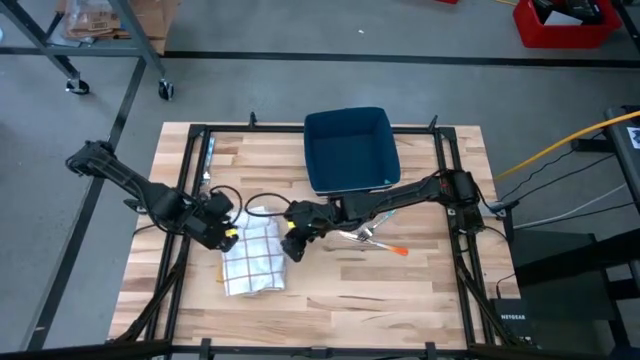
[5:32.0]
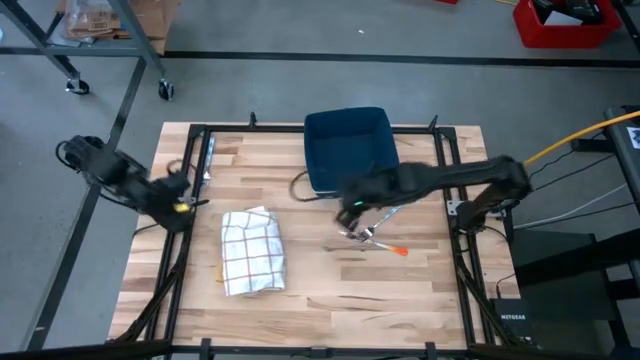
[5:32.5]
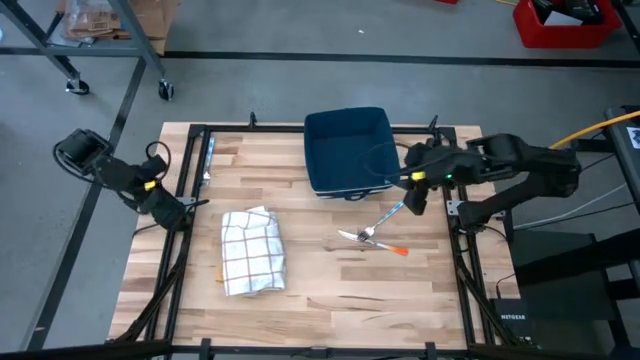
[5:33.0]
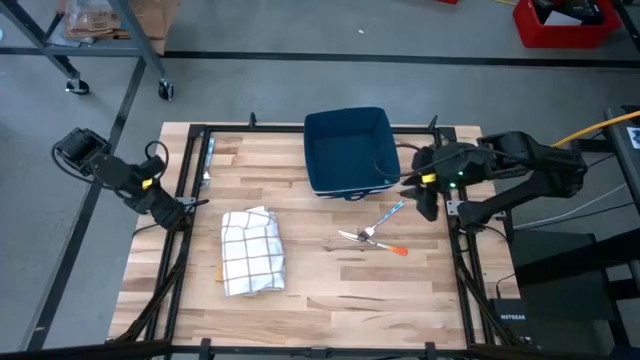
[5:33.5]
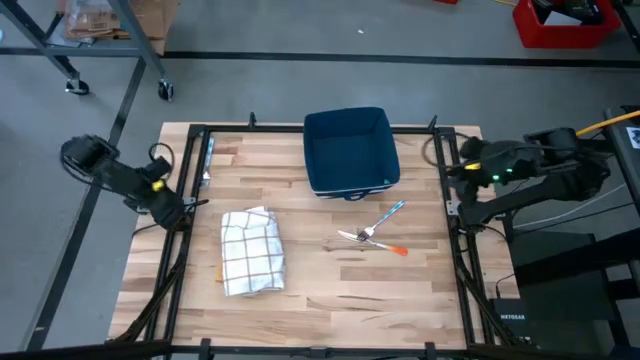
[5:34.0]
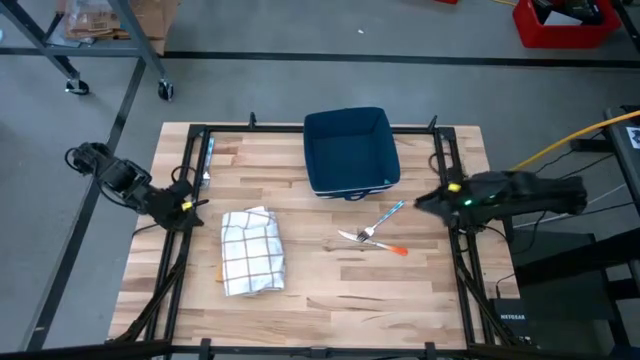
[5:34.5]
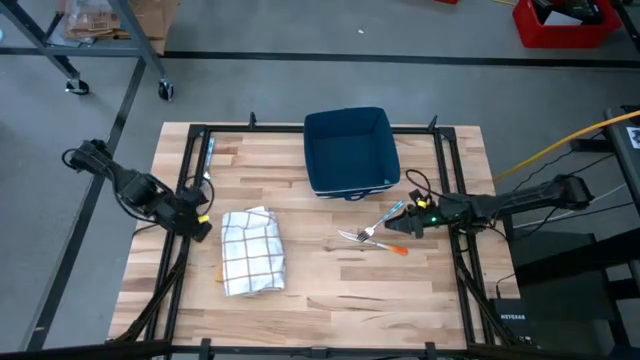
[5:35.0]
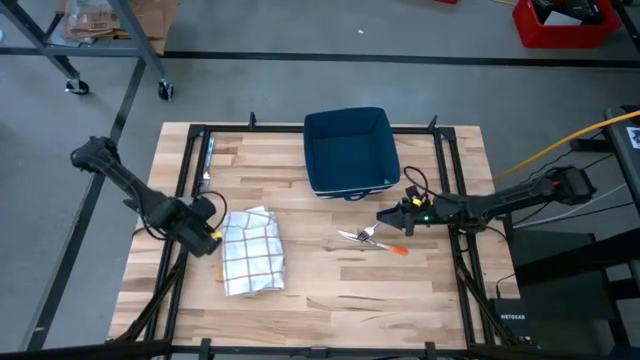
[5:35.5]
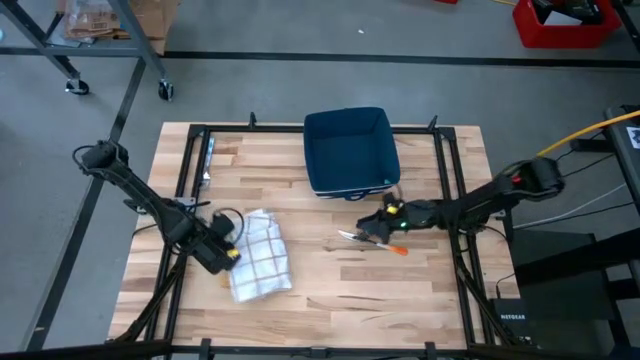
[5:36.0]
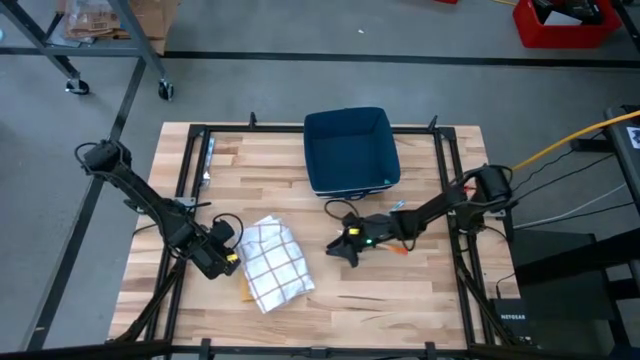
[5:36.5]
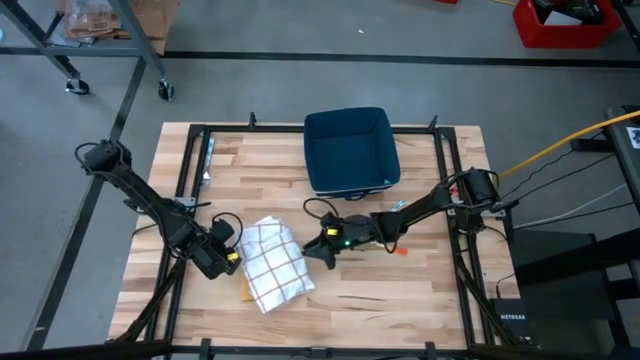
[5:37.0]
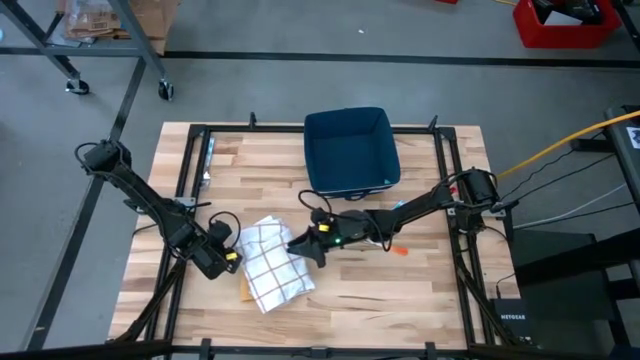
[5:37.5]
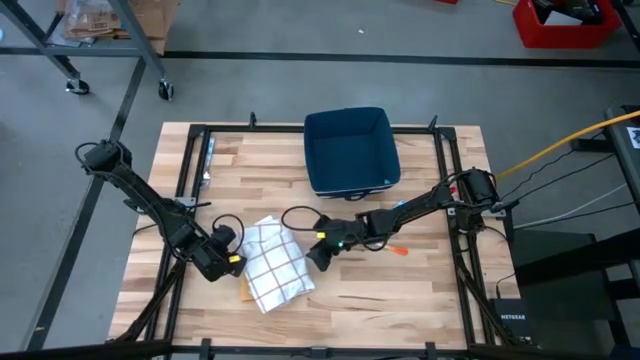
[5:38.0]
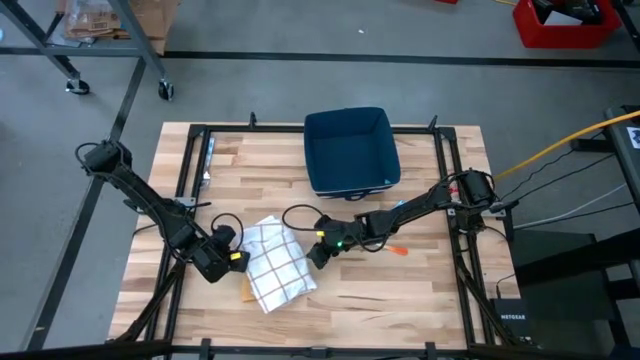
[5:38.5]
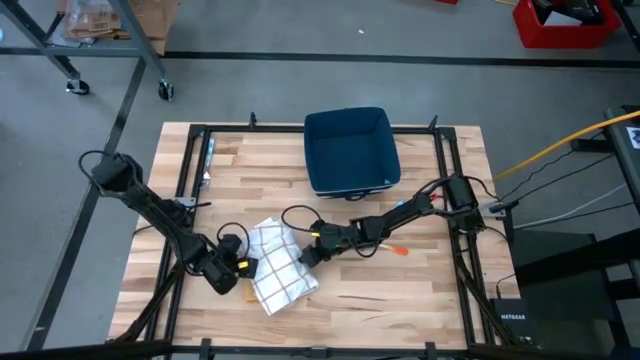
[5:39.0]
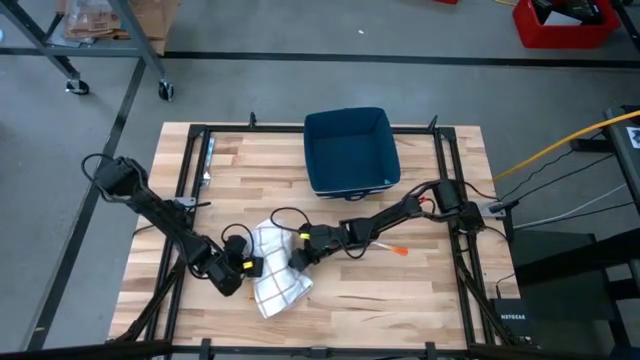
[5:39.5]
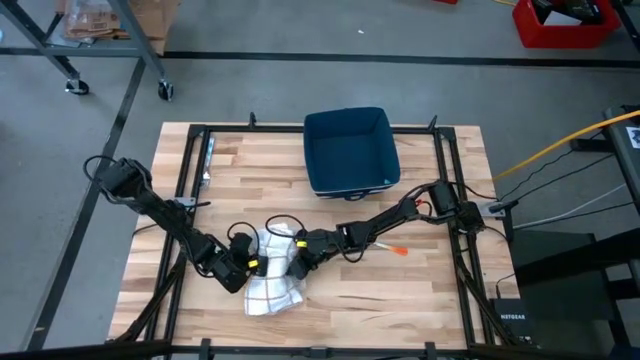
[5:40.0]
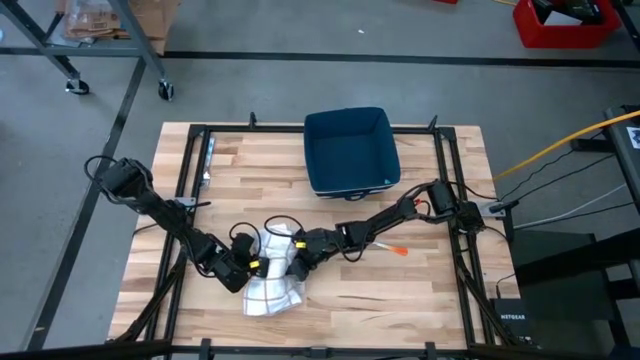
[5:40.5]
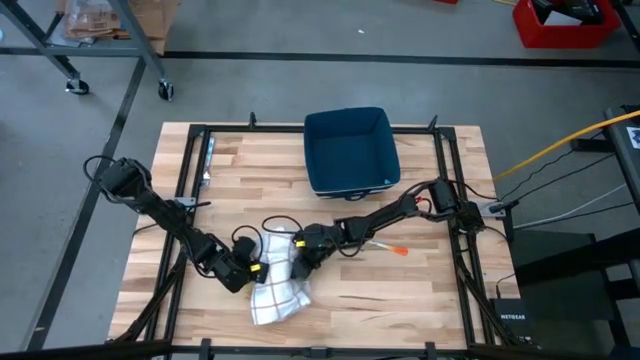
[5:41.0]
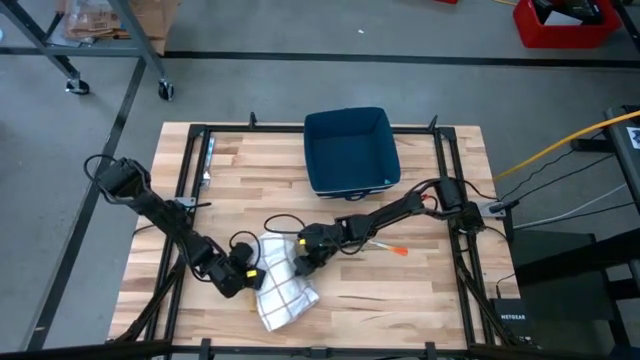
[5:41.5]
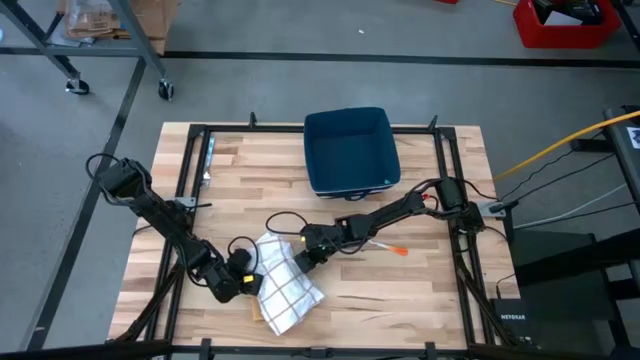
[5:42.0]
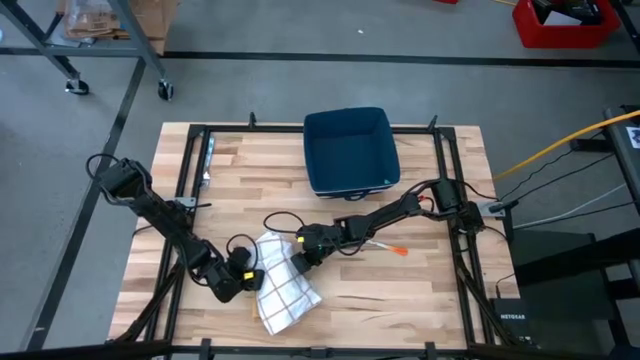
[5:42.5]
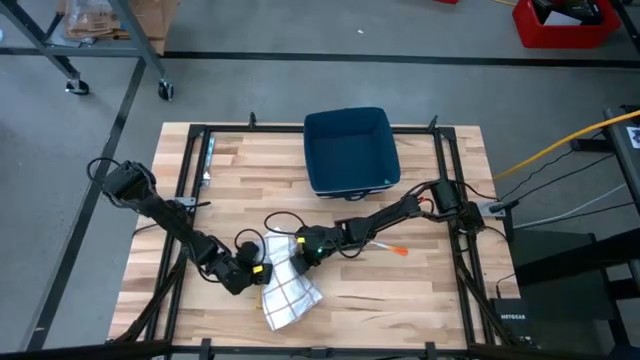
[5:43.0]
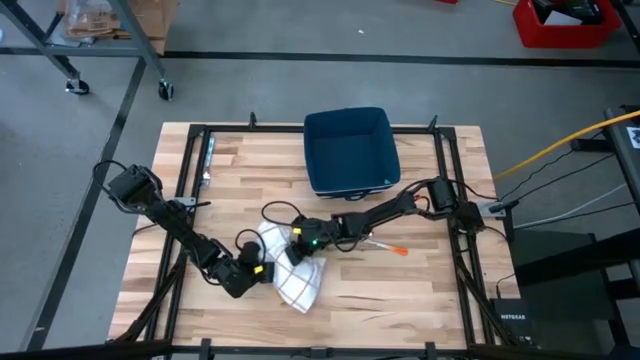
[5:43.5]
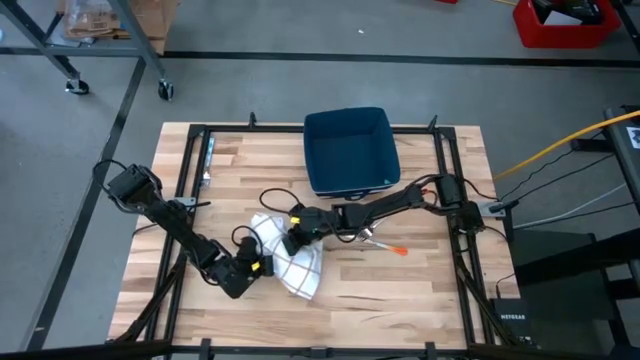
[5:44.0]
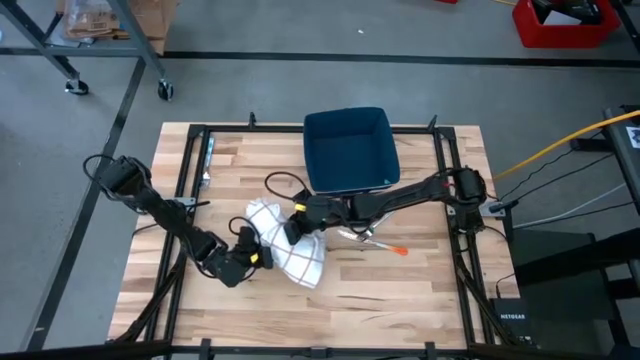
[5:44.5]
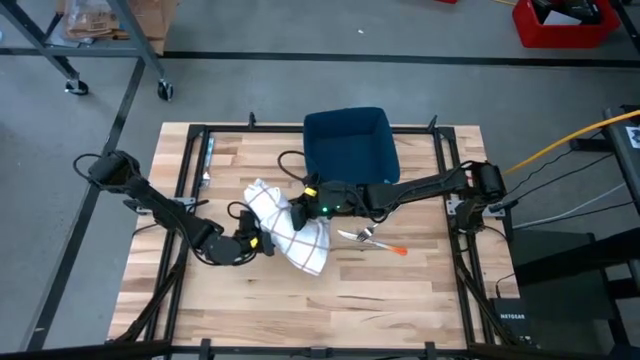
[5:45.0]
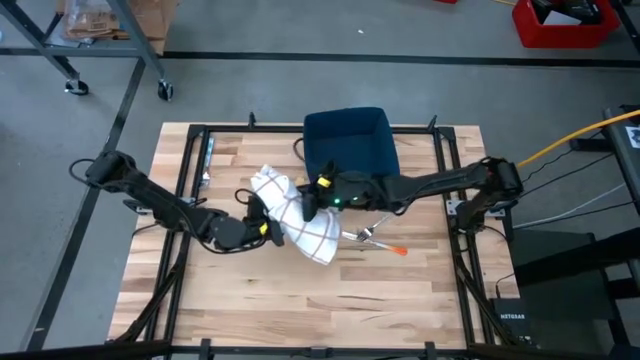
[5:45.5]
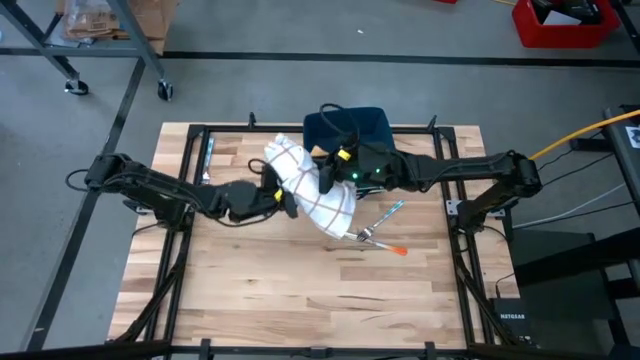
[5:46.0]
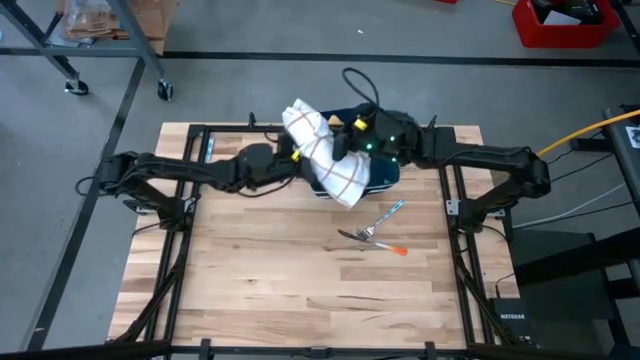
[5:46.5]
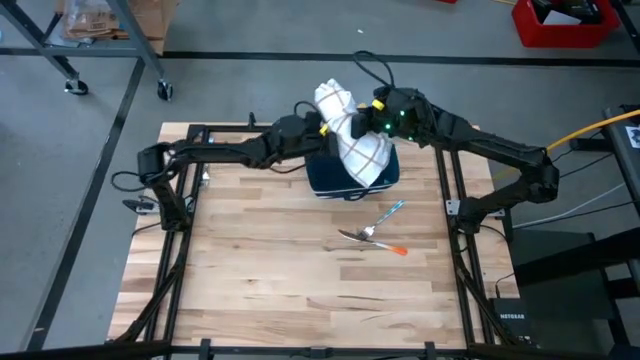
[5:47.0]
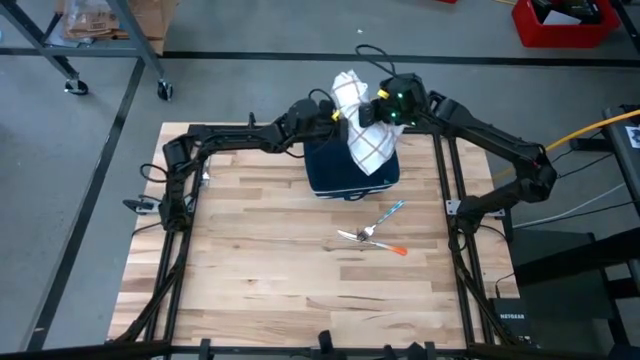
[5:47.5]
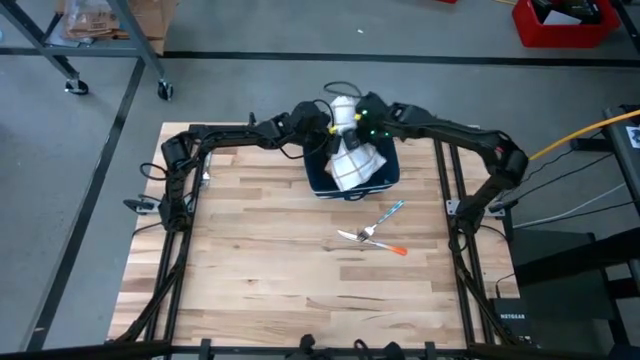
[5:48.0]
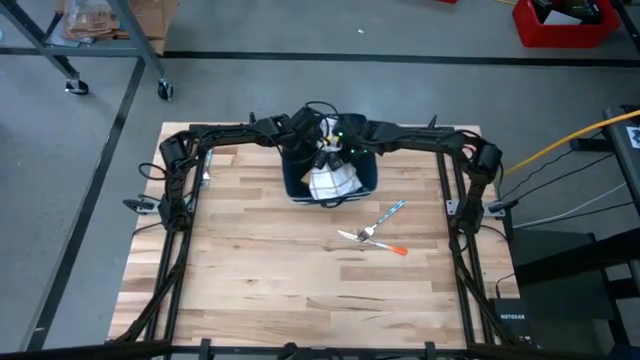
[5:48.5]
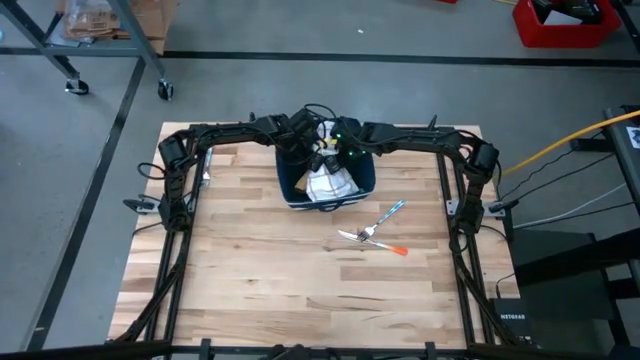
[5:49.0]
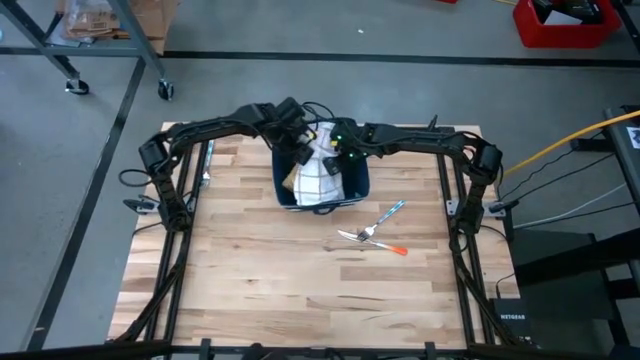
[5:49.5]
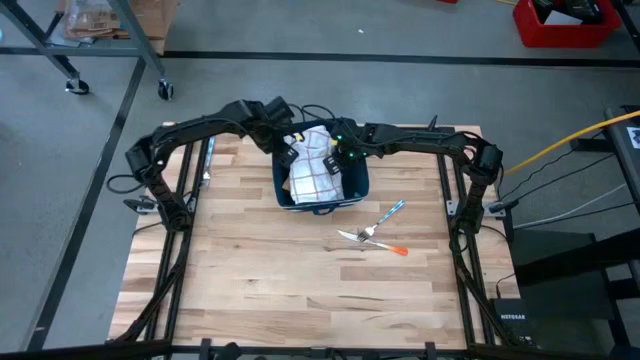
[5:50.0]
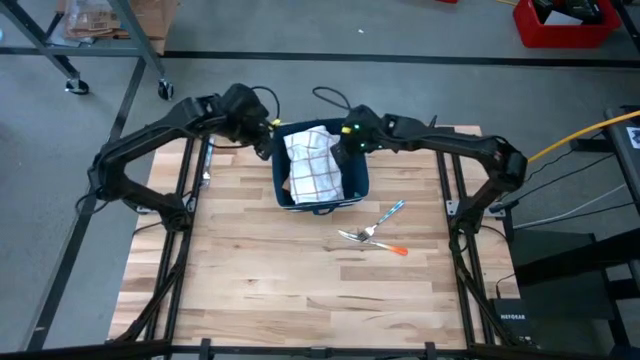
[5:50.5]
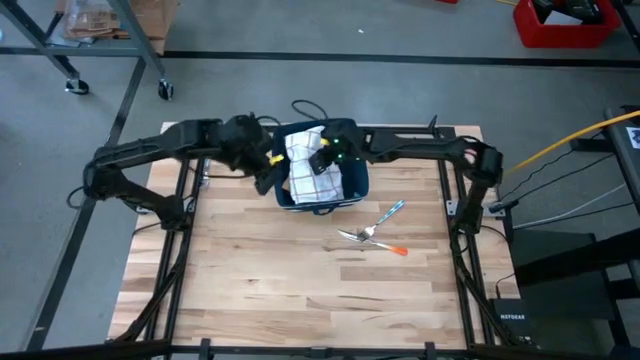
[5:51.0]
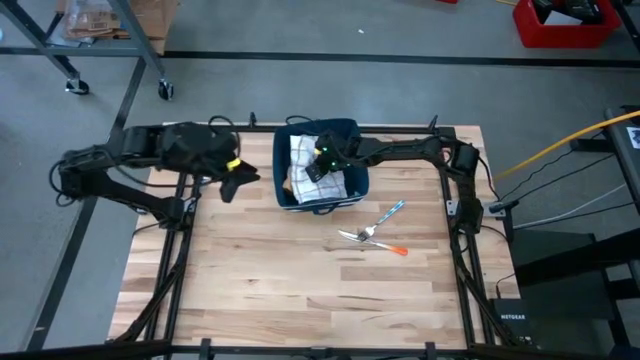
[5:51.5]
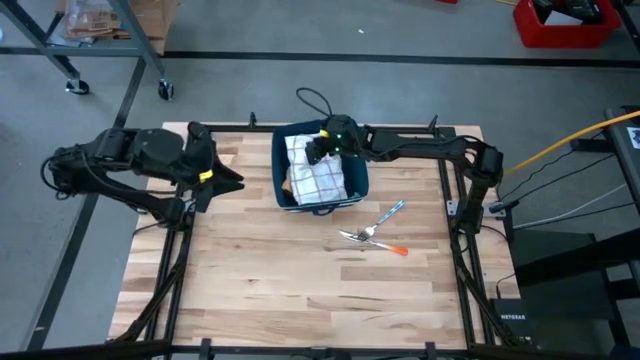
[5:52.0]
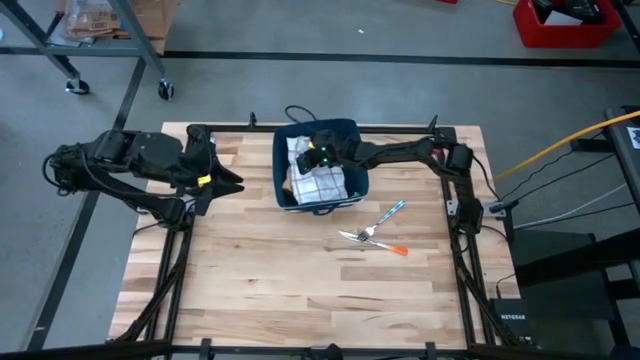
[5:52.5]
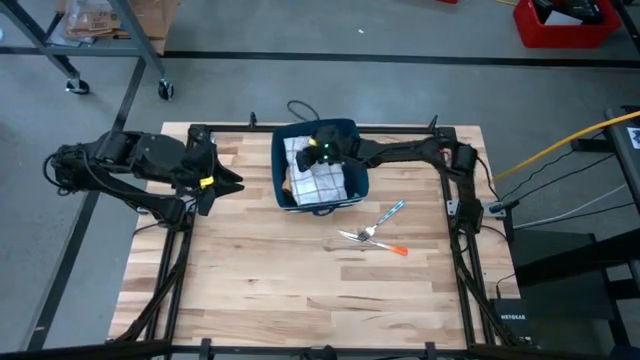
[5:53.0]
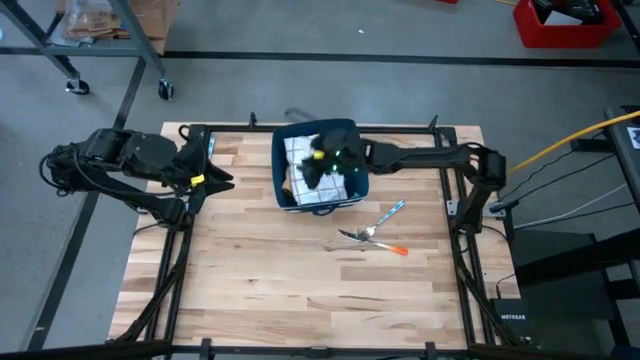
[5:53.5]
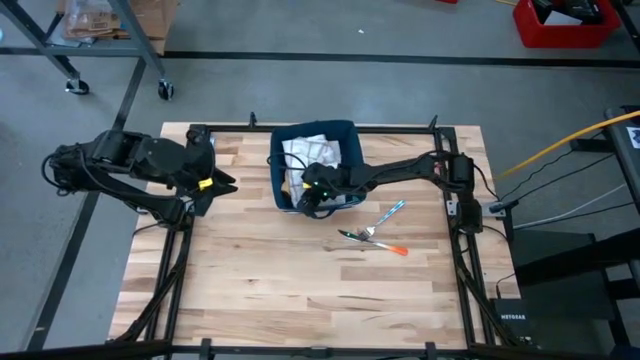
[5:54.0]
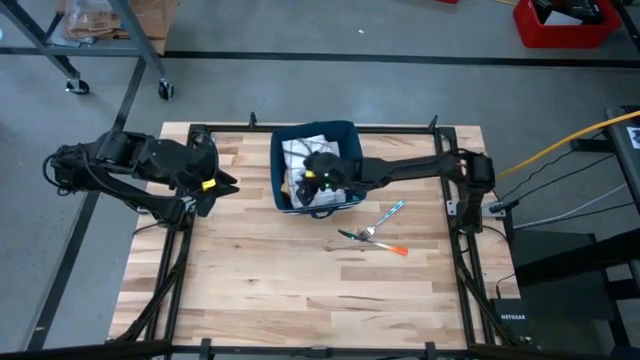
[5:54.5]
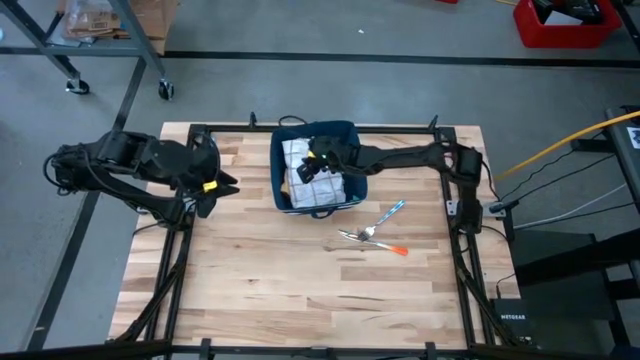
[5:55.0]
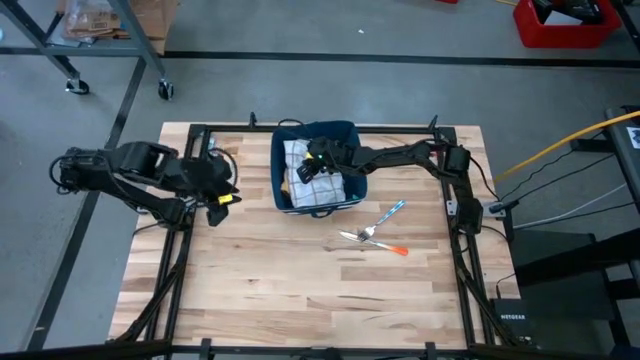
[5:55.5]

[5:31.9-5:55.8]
Task: Fold towel
Put the stacked folded towels into the blue laundry organizer
